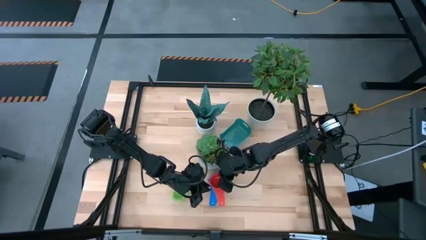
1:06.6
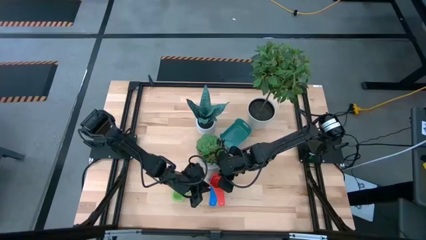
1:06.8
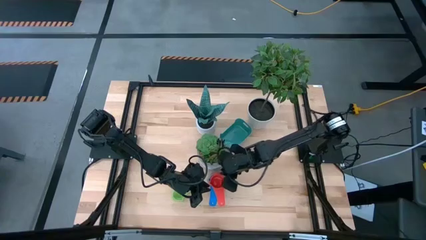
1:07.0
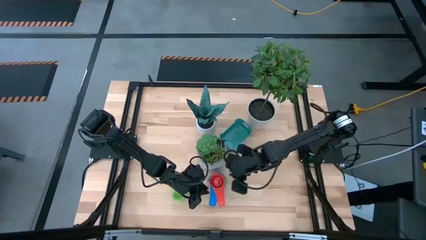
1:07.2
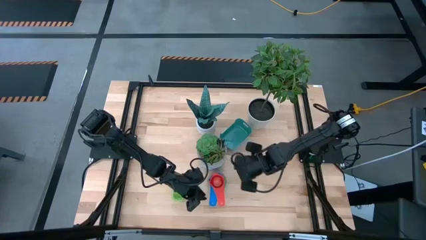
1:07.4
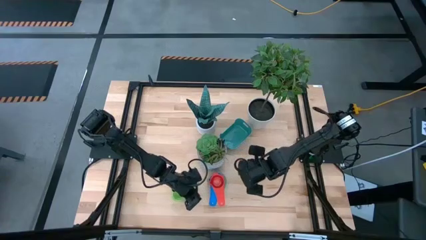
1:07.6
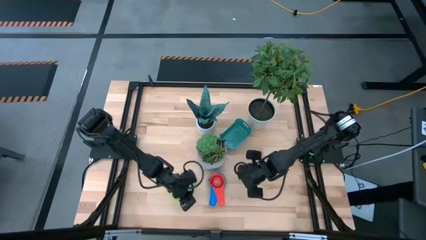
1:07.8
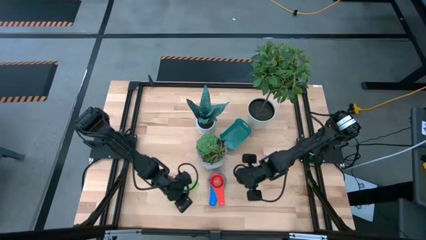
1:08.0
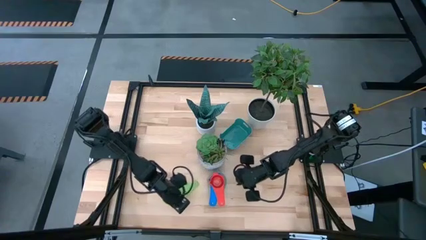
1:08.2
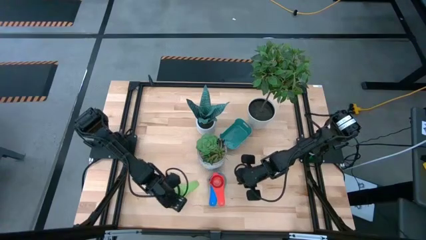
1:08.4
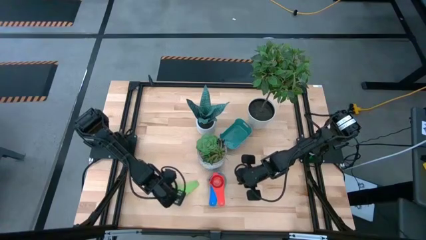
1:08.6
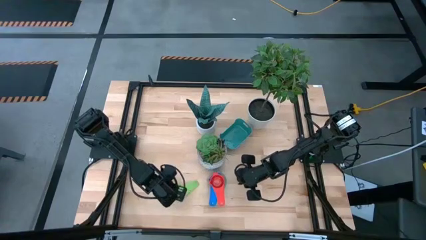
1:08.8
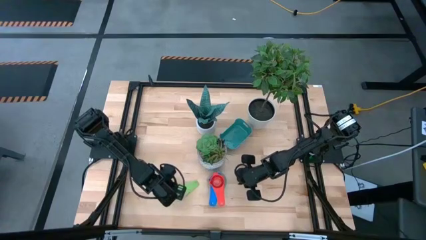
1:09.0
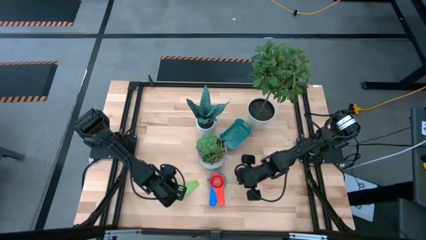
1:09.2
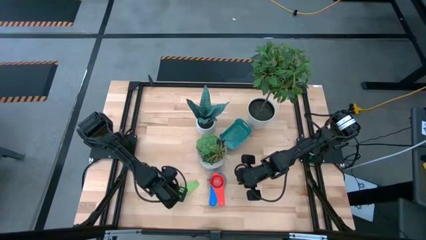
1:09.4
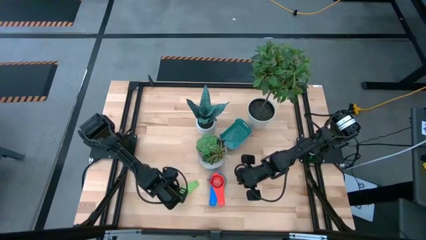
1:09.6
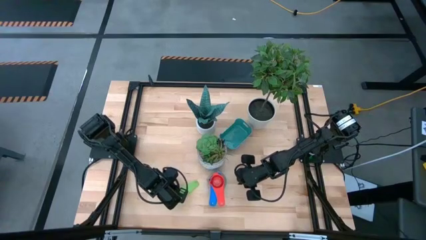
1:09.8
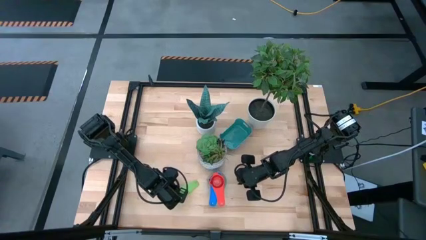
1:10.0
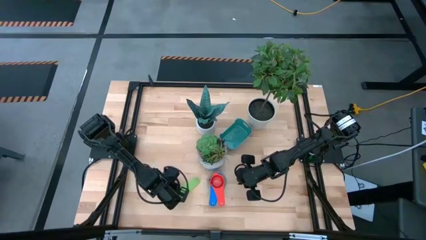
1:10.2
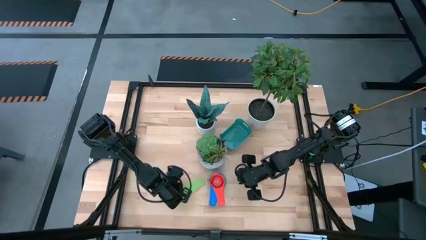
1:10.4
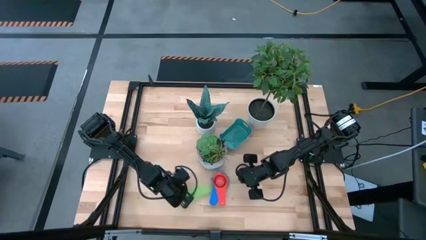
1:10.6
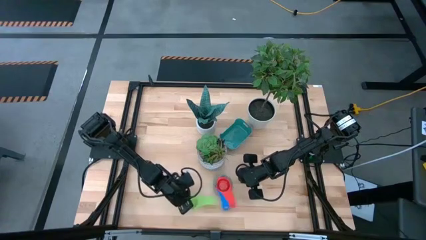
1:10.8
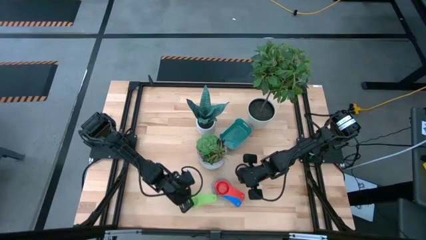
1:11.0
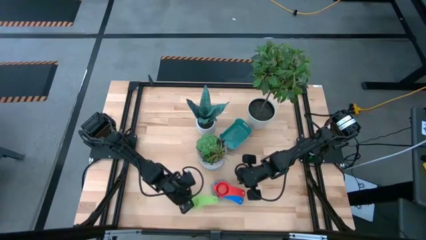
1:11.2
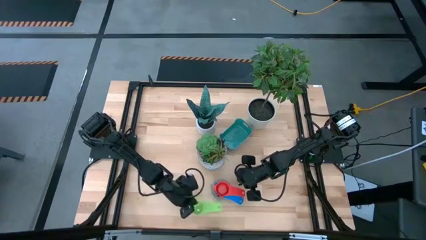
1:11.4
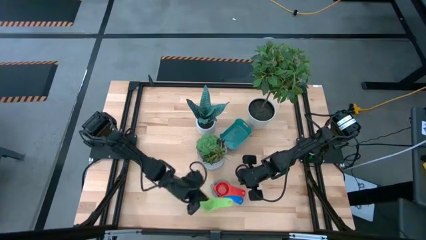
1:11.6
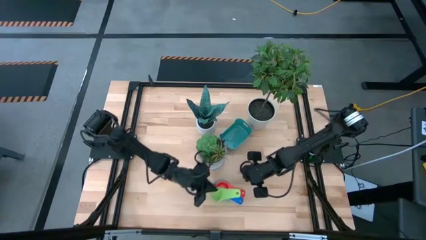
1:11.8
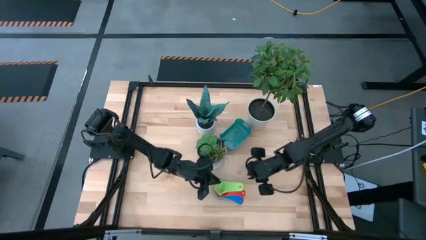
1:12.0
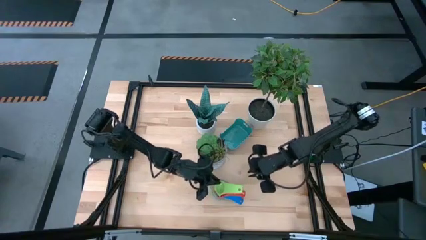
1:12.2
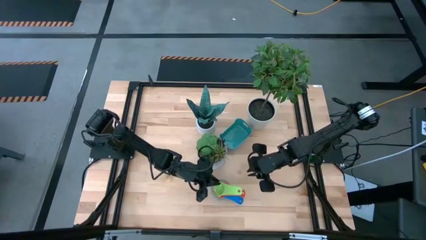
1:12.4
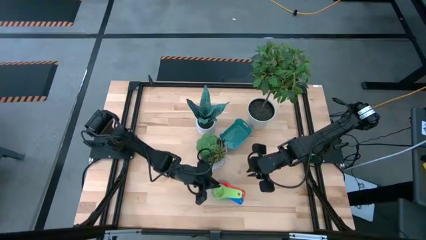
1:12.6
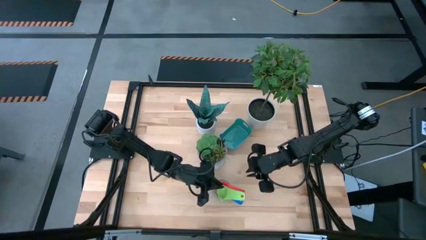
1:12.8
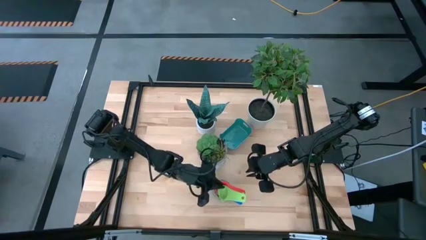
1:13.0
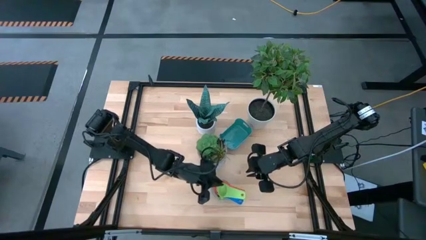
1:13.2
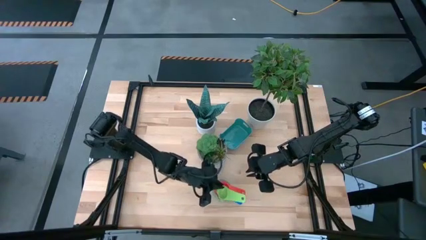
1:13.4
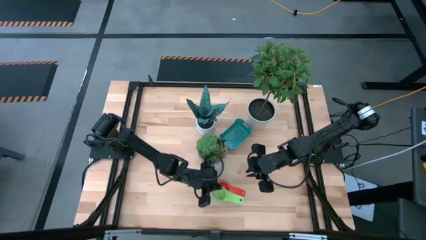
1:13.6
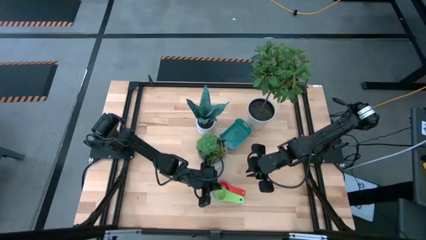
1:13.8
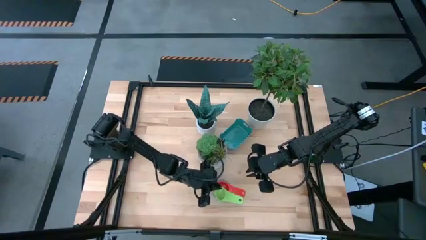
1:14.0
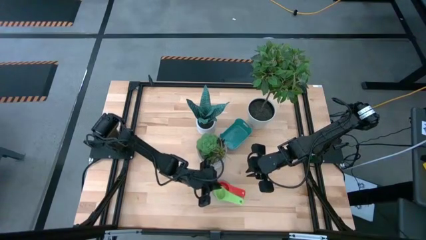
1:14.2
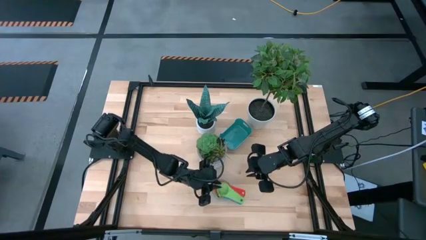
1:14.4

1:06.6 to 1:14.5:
Task: Nest measuring cups in basket
Stack the green measuring cup on top of the red measuring cup

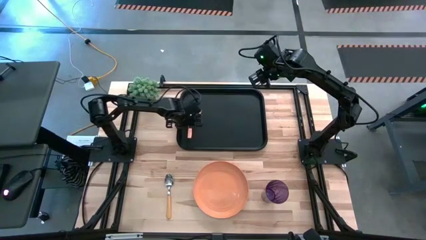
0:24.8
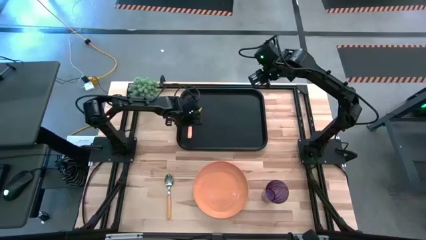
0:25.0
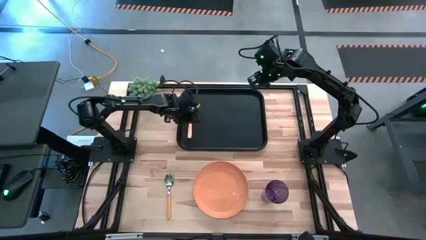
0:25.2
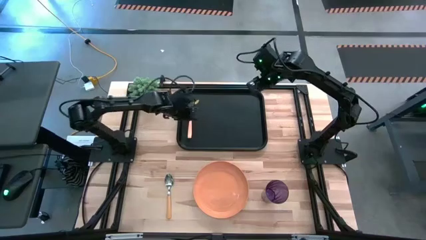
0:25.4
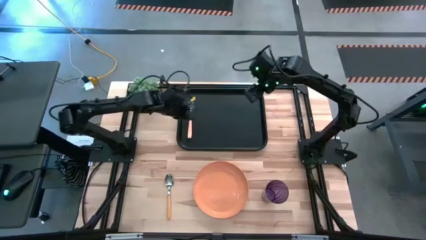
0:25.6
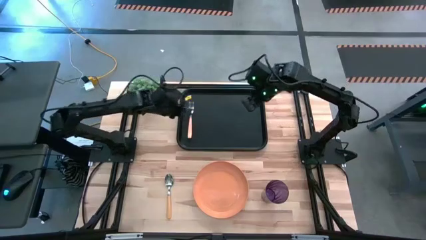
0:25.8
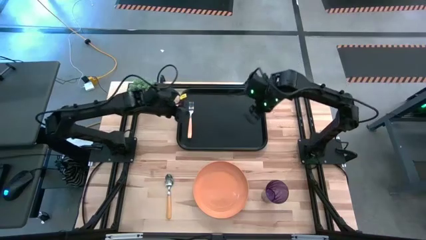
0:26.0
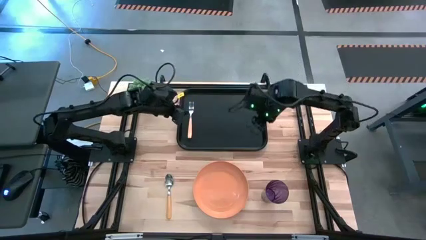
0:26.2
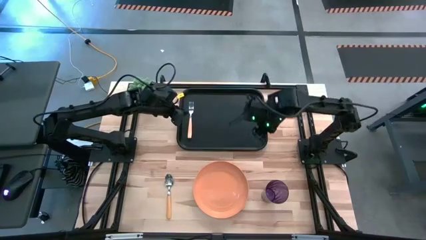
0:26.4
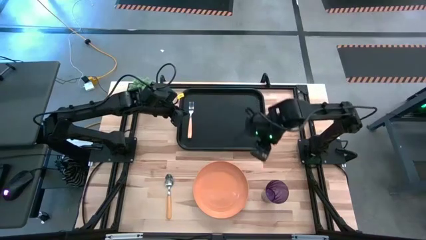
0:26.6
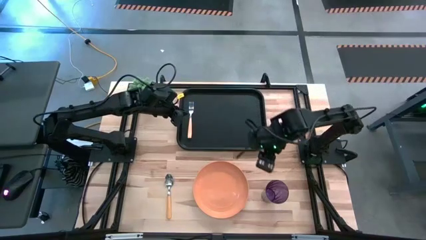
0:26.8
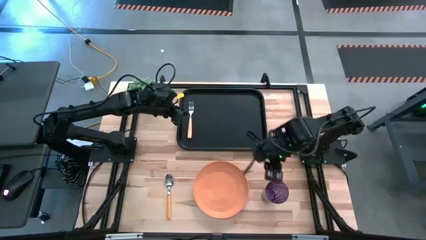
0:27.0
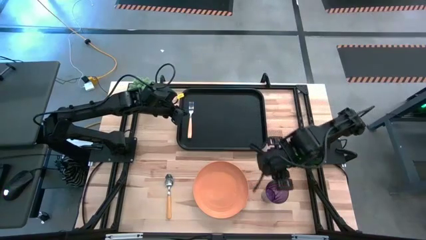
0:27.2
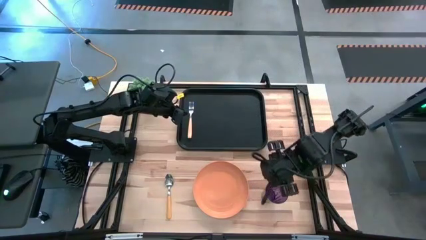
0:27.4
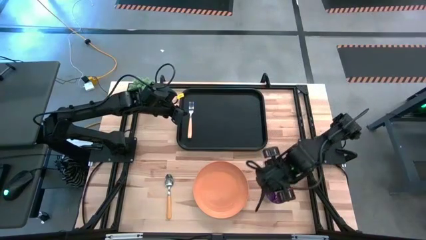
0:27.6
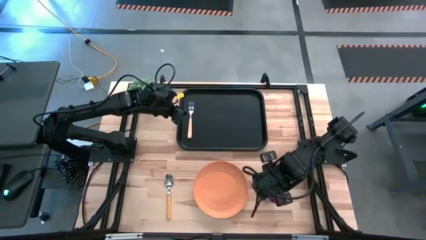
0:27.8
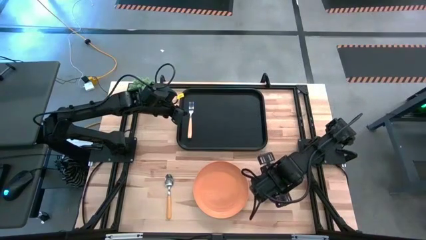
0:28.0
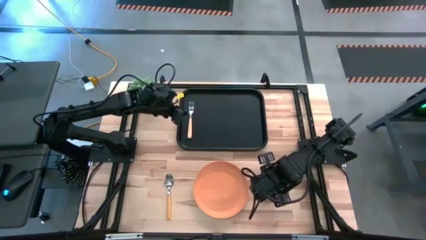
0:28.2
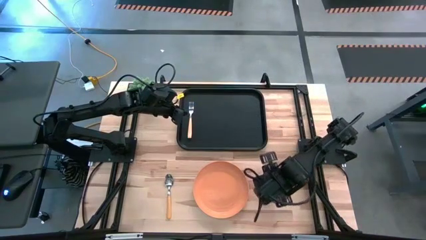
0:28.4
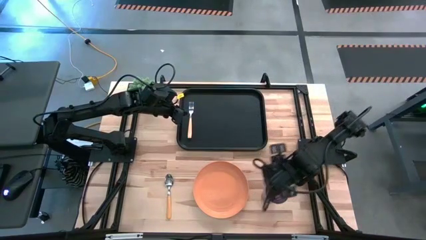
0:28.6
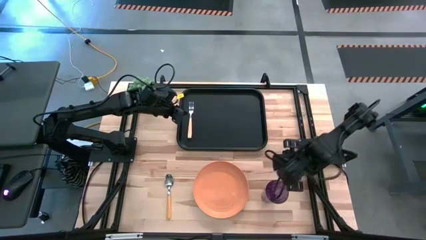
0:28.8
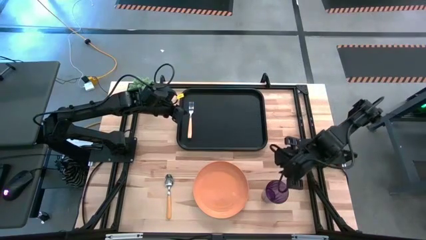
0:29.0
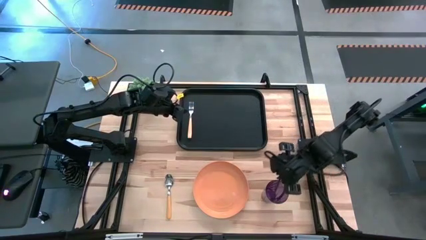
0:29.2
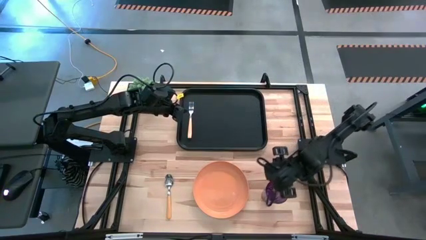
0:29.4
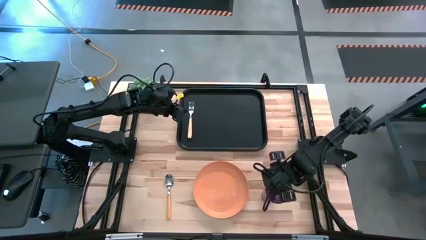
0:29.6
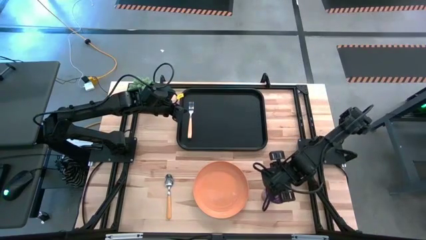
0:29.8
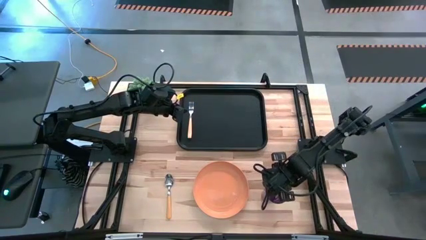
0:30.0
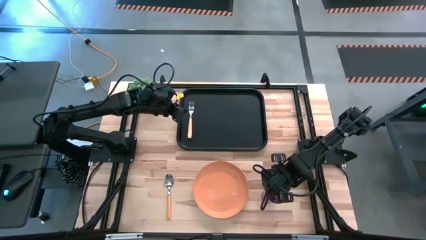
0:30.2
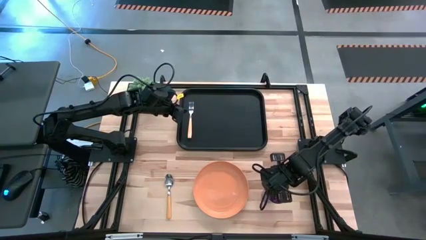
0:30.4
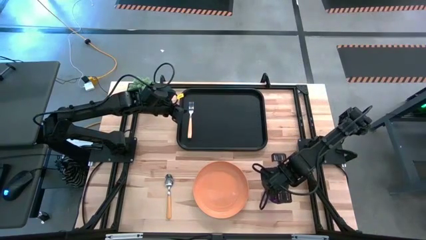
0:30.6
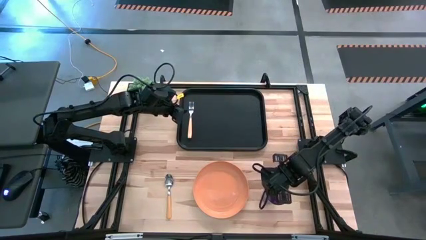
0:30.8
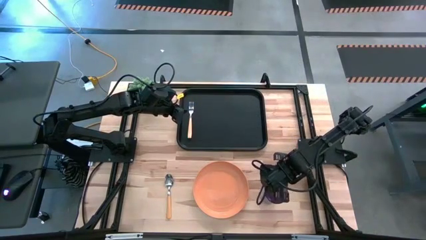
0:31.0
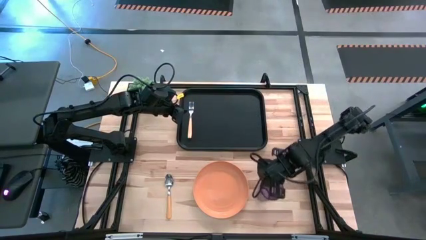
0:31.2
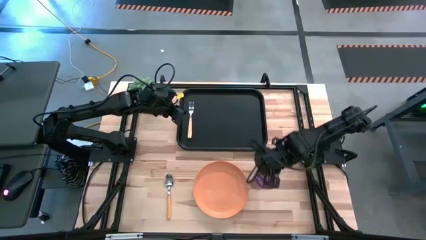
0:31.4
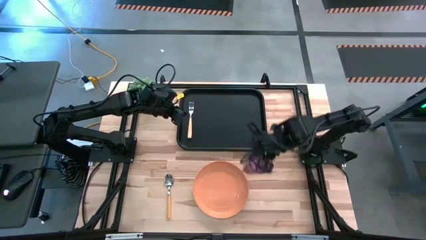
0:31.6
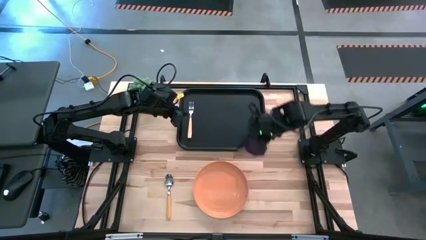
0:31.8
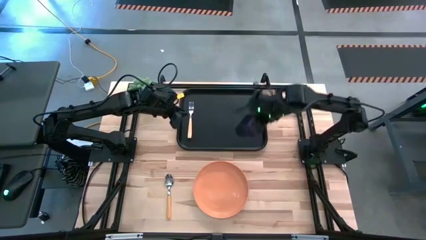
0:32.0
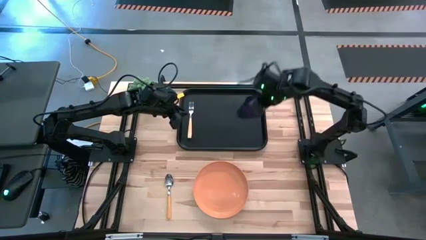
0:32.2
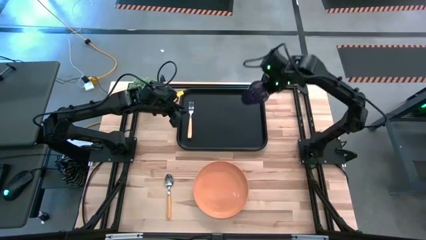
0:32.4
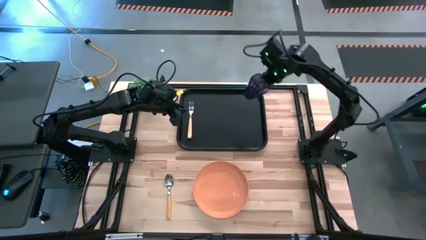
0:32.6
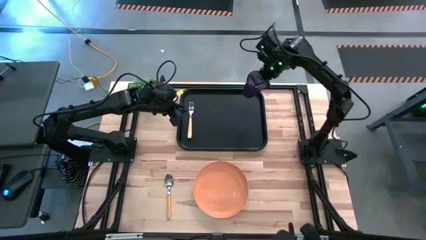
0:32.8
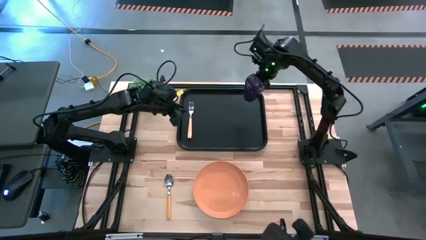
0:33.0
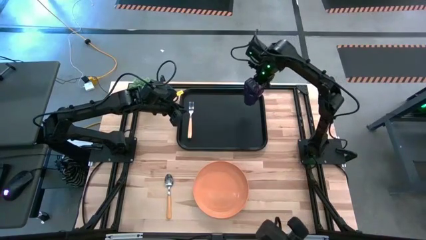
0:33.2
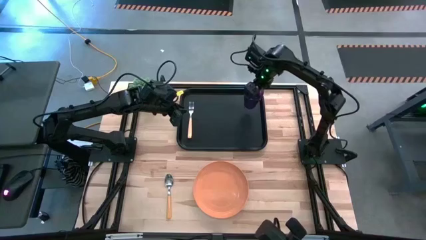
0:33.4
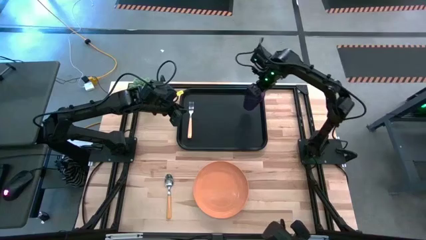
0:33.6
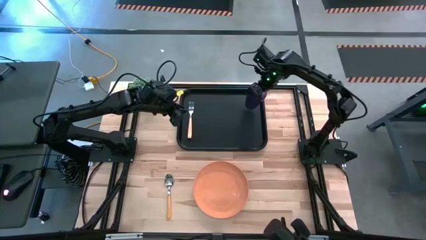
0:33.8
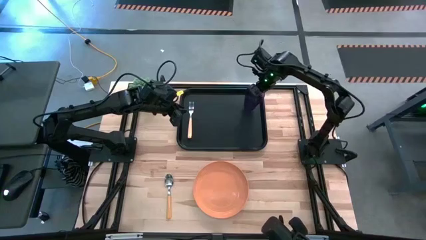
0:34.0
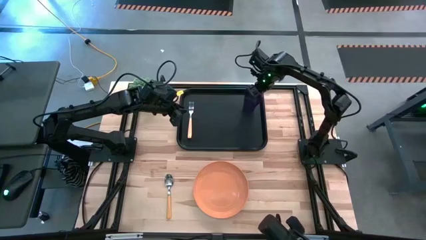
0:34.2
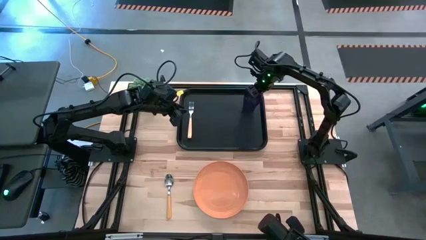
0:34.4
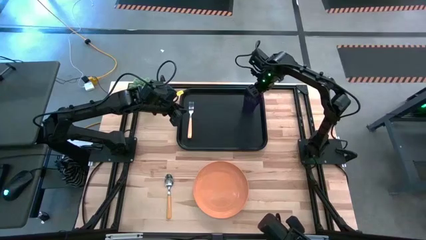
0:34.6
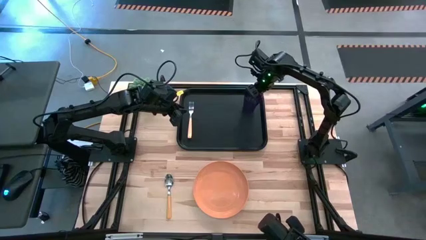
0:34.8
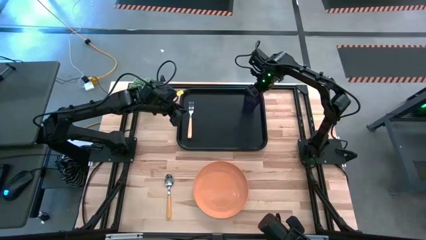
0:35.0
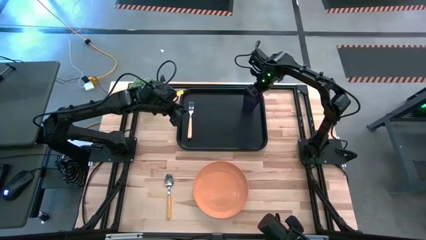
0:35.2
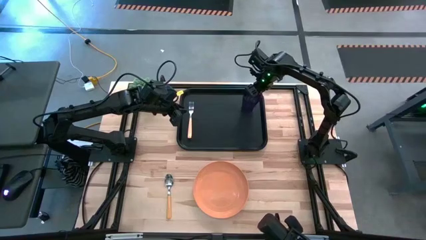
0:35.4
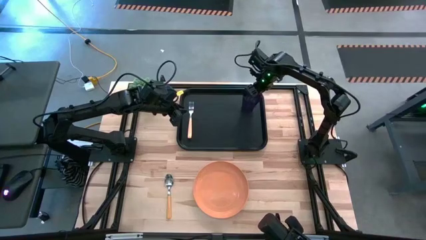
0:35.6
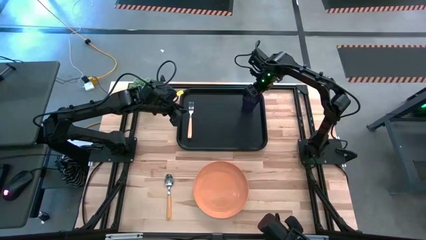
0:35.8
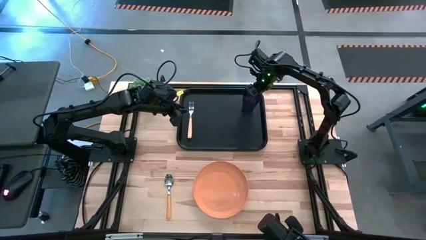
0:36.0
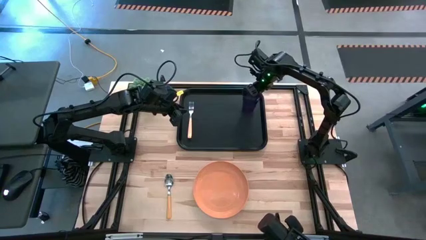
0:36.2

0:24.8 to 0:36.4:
Task: Pick and place plate/cup/fork/spoon on tray
Put the violet cup to the right of the yellow fork on the black serving tray
